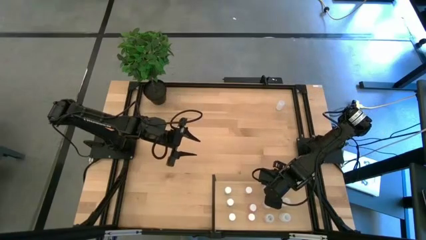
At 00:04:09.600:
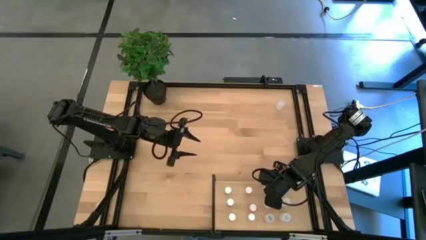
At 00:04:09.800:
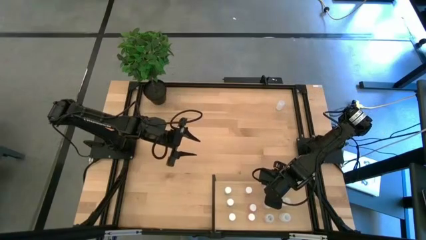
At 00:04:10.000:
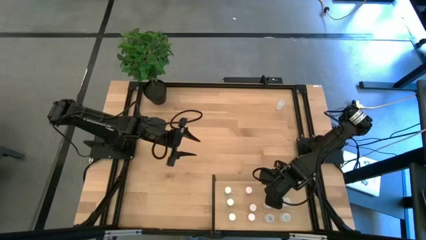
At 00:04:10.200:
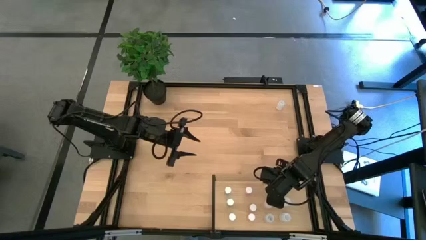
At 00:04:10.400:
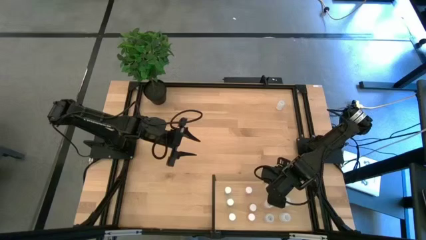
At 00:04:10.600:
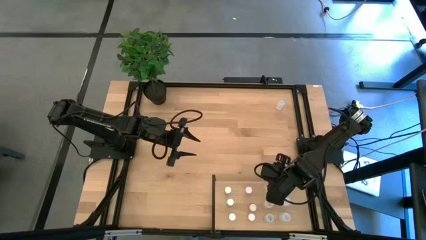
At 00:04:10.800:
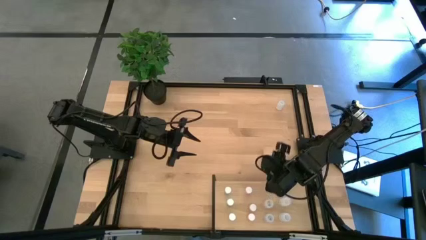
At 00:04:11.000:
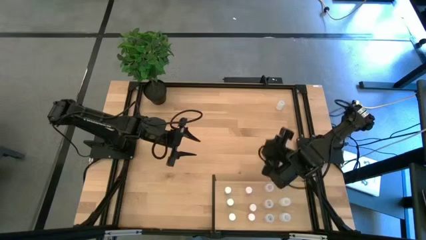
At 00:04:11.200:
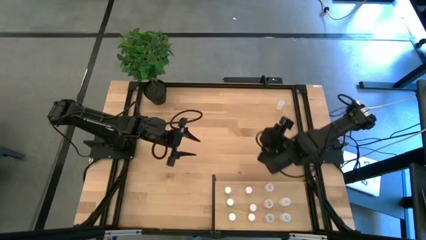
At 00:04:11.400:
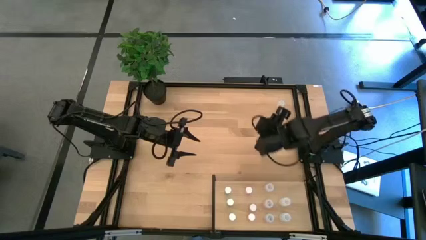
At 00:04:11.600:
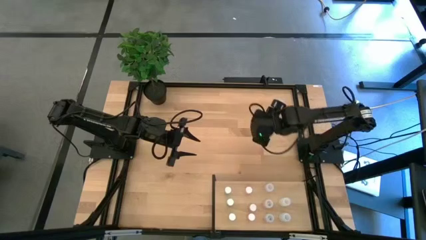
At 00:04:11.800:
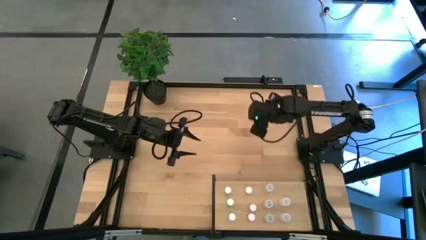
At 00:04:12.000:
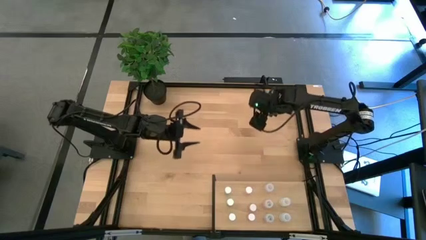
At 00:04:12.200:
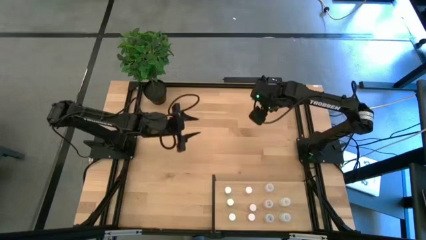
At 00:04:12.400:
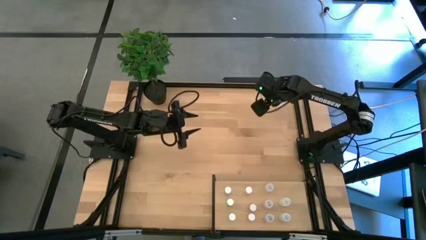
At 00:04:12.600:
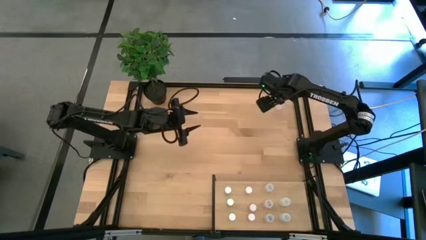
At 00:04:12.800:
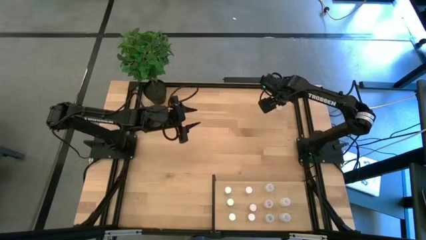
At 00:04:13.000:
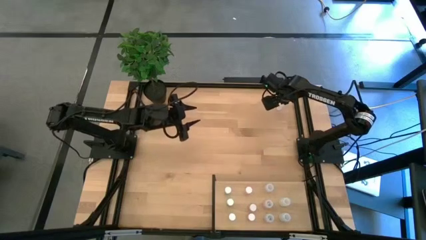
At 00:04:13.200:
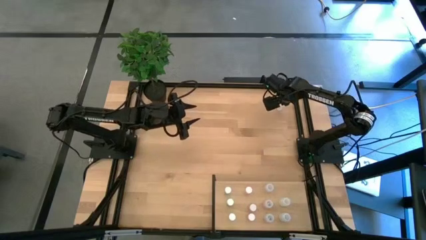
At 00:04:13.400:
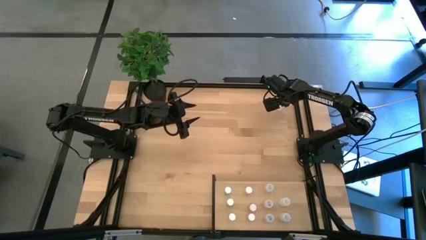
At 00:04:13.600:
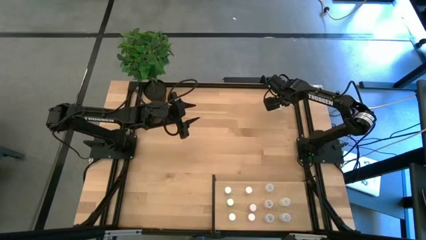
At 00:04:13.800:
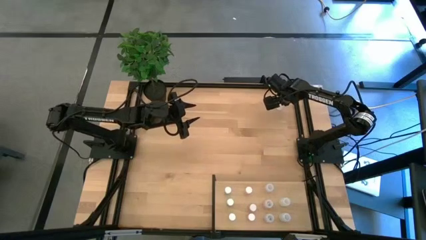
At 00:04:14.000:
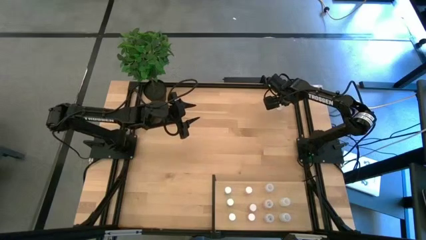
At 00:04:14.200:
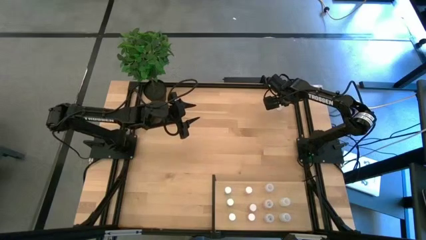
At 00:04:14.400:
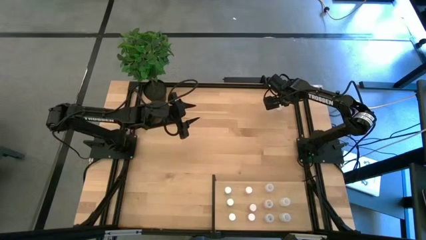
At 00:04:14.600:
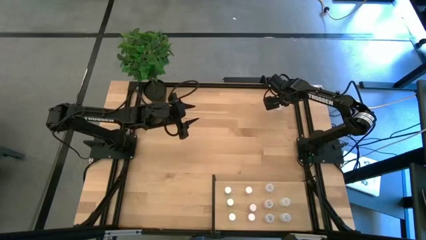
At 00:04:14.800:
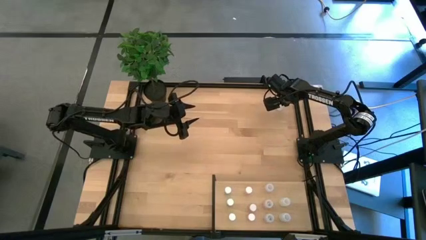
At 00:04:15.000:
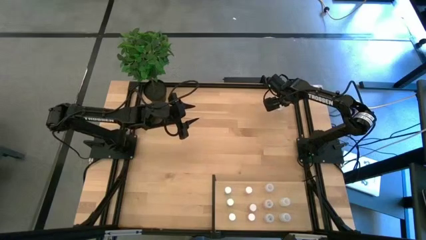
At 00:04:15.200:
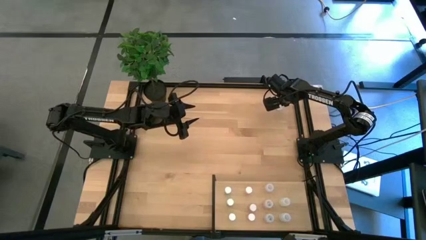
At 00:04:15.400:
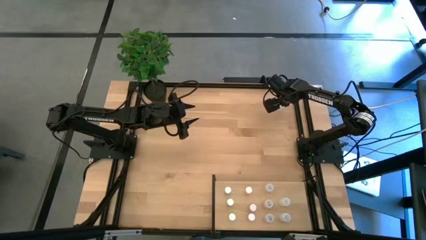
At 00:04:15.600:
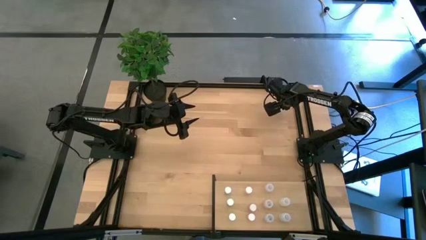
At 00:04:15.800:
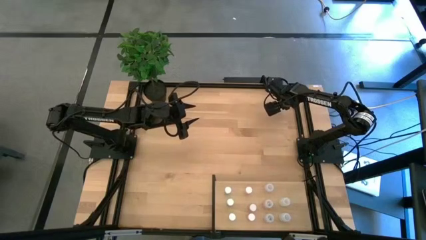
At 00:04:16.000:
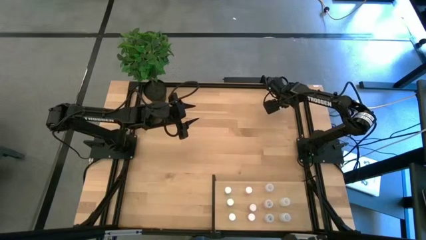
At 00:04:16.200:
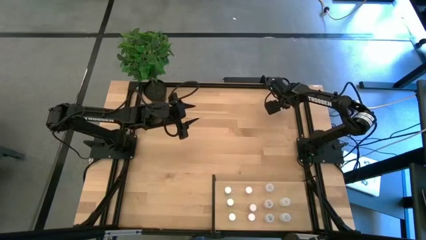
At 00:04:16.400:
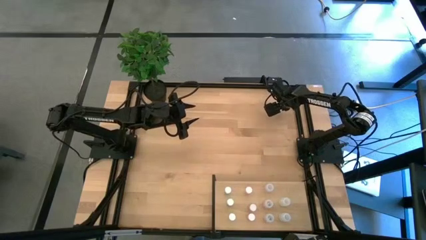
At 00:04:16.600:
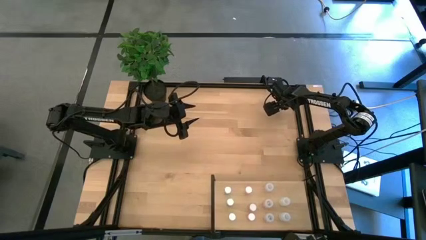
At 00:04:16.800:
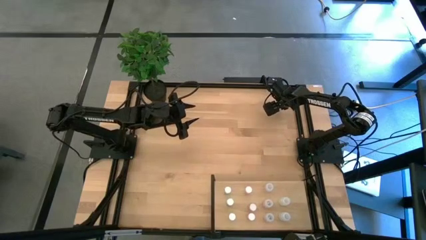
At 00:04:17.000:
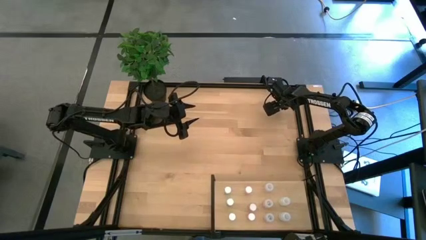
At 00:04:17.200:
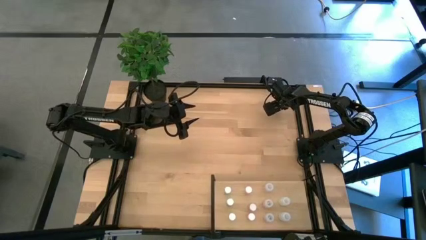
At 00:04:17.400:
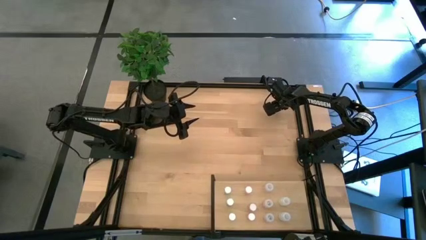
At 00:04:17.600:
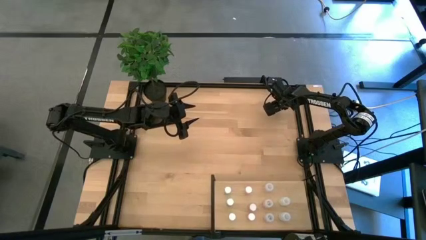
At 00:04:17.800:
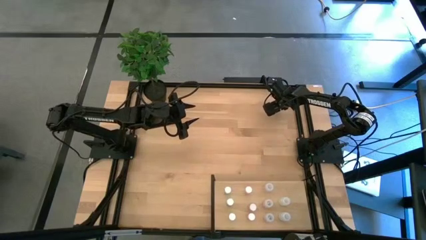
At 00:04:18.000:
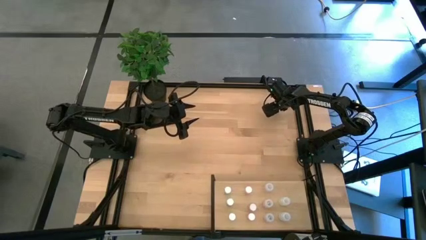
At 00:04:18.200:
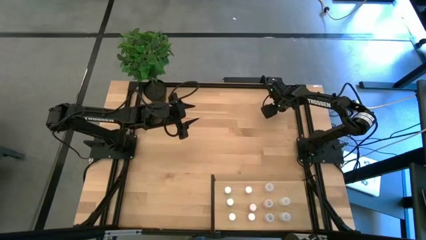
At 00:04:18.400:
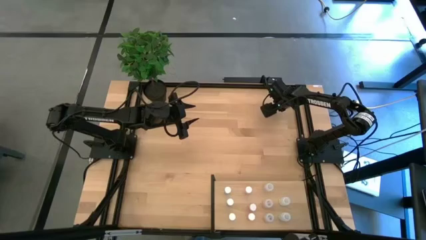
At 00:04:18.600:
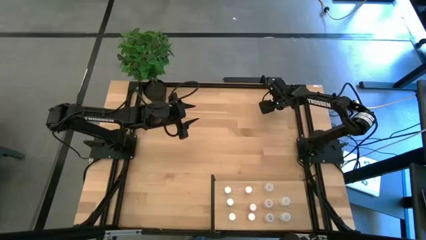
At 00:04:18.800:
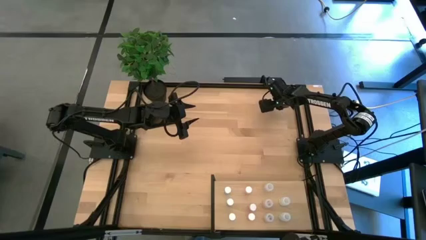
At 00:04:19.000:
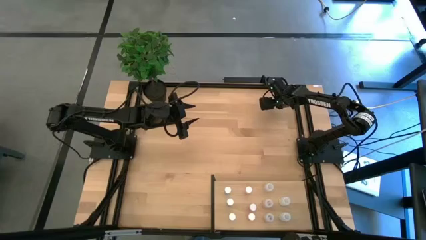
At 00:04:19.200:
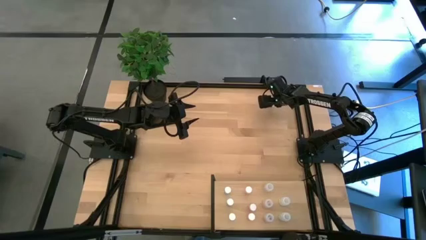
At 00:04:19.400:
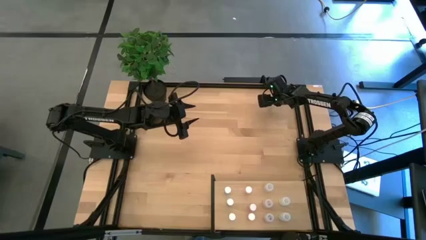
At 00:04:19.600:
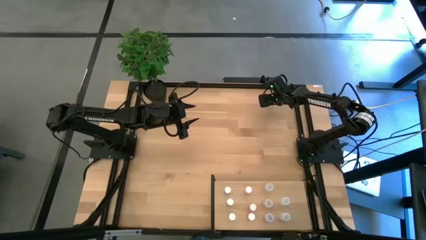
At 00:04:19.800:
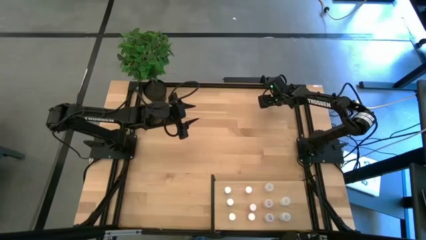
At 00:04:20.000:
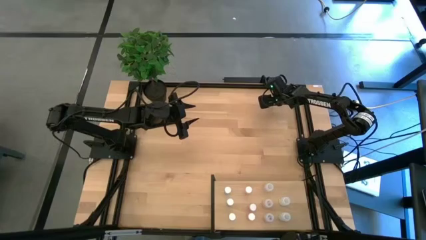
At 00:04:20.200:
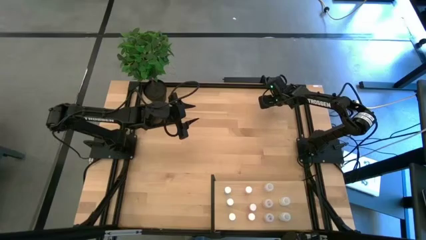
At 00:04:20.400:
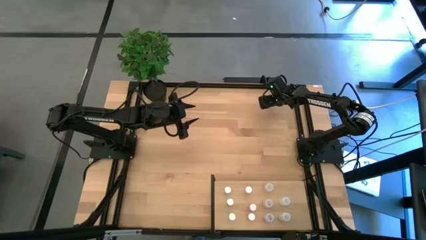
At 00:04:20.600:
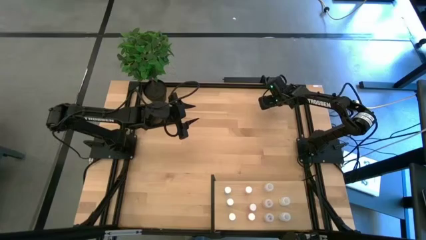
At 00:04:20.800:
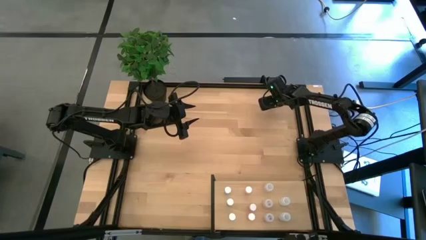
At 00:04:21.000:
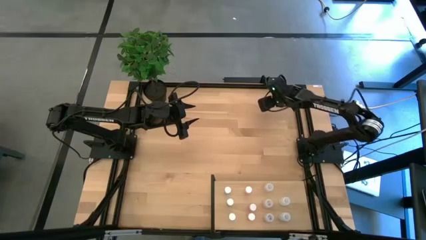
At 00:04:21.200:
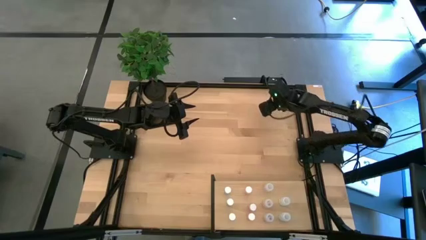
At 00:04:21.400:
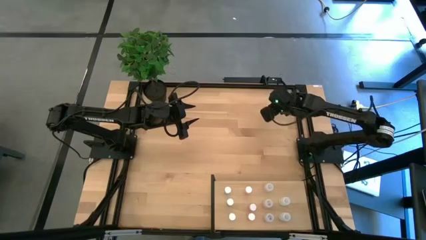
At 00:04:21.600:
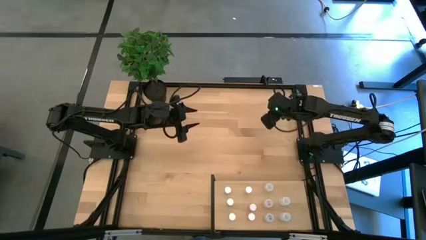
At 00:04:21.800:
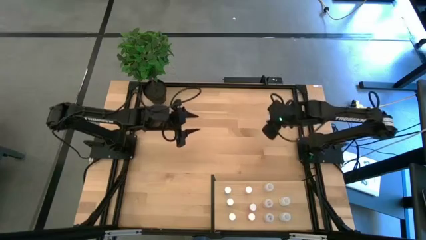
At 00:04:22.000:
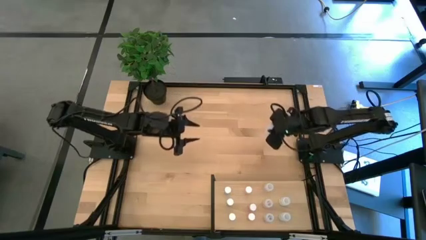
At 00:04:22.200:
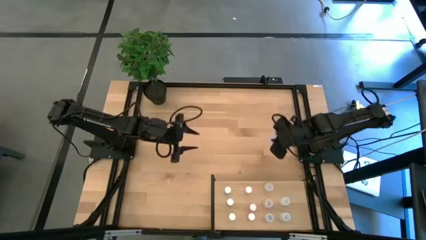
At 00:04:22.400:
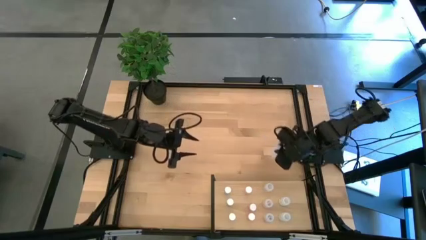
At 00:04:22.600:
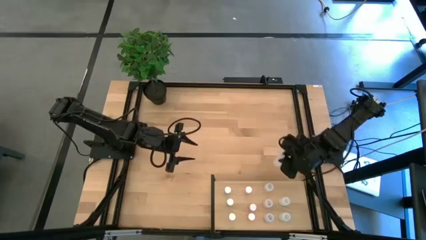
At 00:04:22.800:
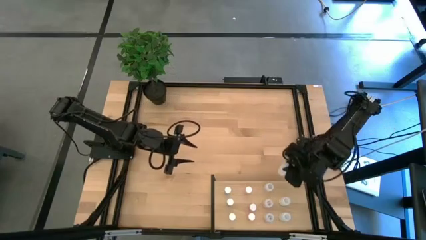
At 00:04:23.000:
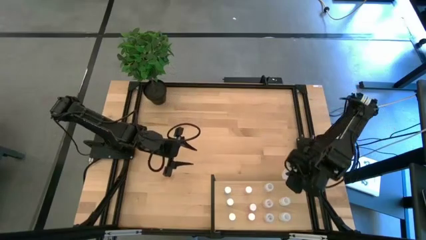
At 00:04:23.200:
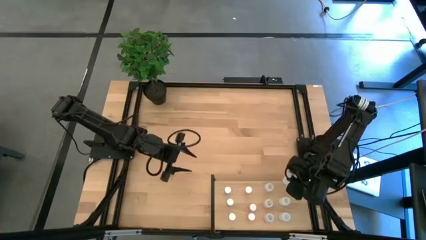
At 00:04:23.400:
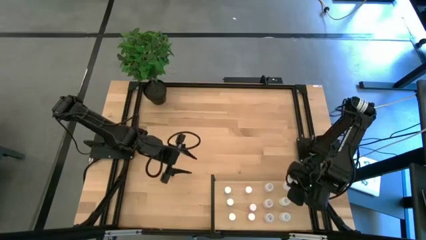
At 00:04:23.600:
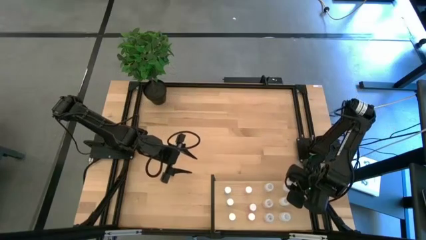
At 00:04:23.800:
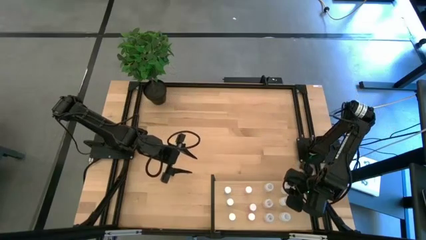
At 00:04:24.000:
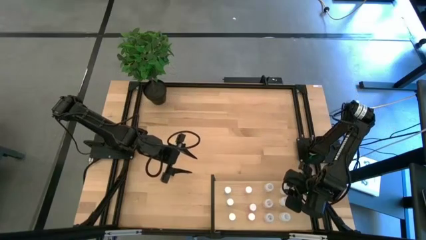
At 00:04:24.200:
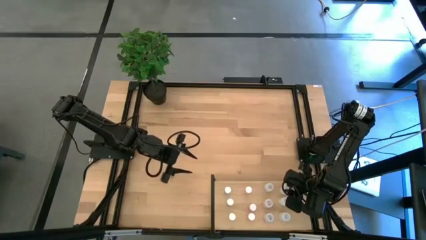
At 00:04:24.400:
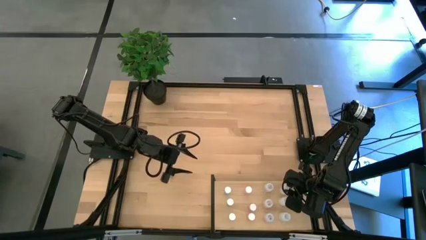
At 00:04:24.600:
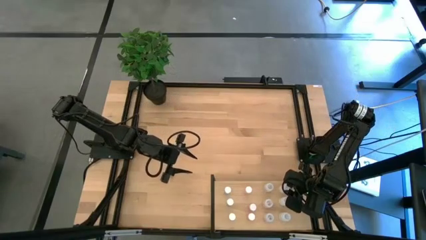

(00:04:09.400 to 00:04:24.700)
Task: Pick and place medicine bottles onto shelf by color
Put the white pill bottle on the shelf aligned with the other white pill bottles
